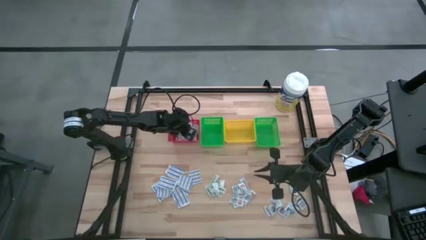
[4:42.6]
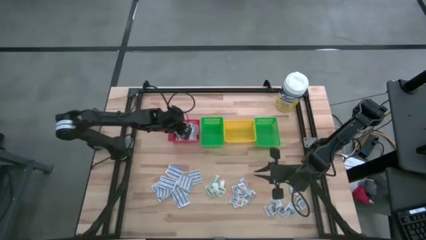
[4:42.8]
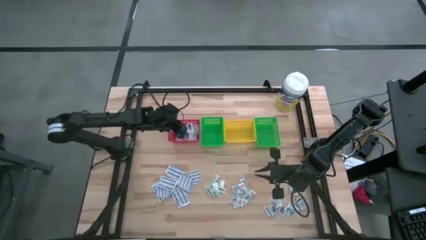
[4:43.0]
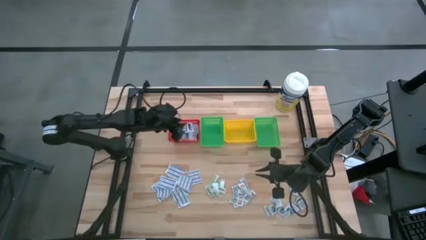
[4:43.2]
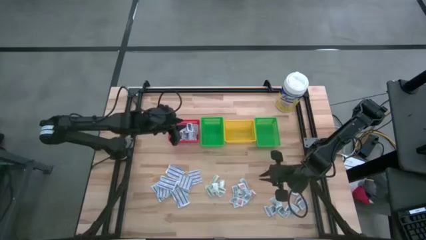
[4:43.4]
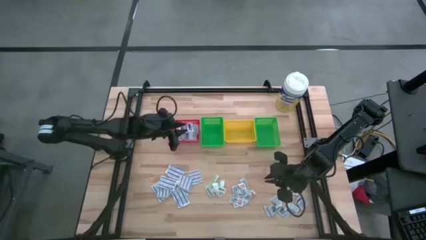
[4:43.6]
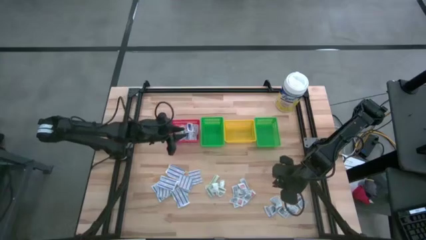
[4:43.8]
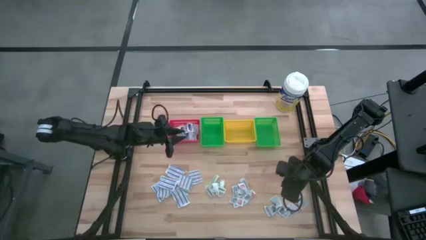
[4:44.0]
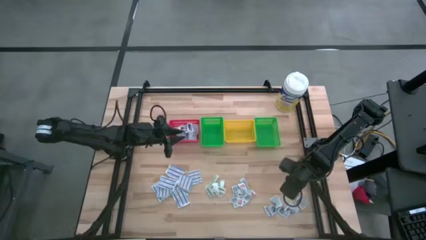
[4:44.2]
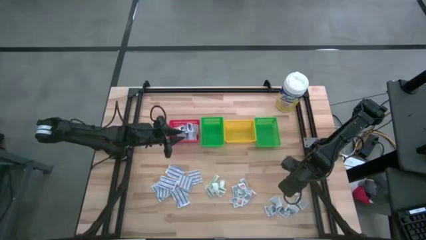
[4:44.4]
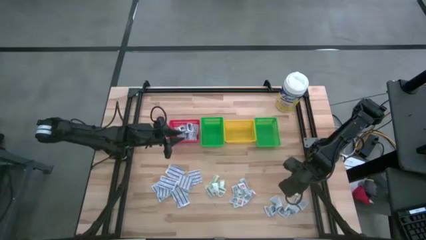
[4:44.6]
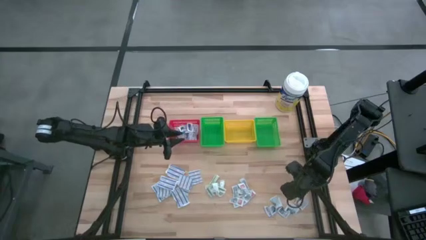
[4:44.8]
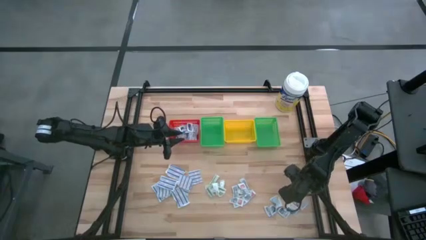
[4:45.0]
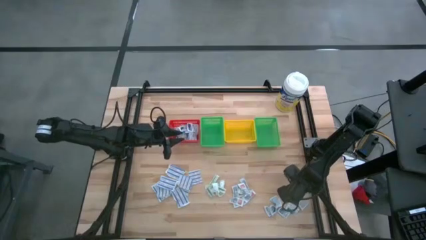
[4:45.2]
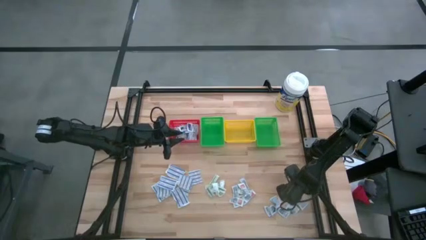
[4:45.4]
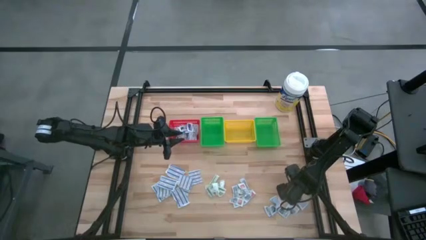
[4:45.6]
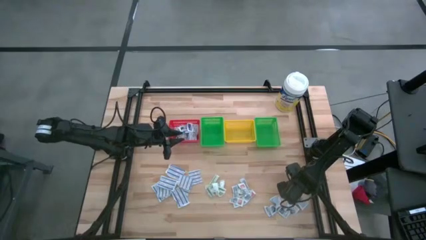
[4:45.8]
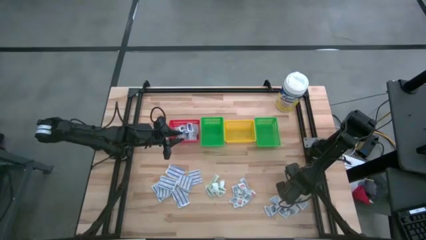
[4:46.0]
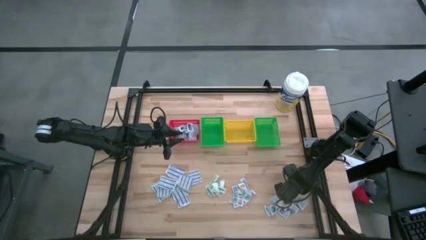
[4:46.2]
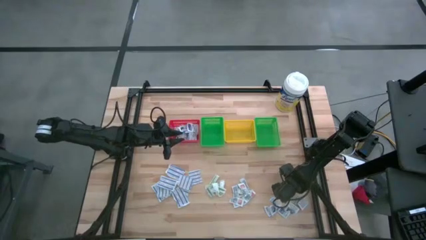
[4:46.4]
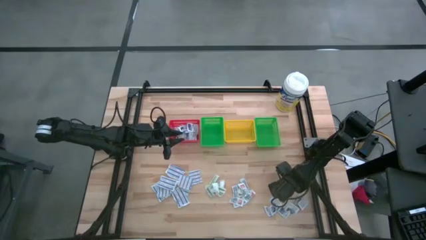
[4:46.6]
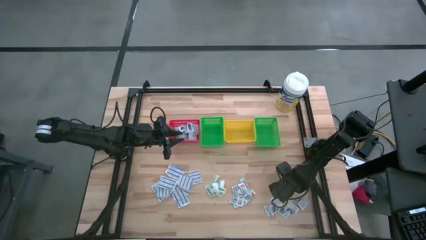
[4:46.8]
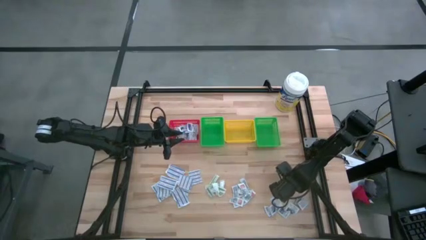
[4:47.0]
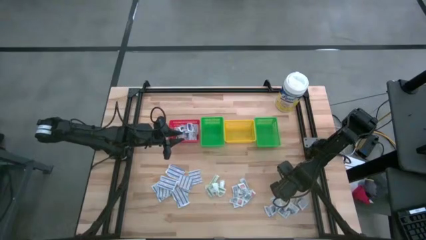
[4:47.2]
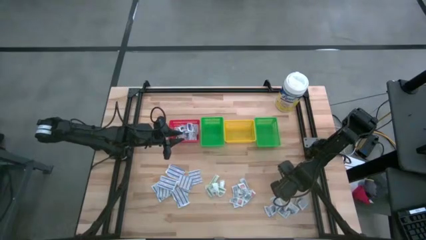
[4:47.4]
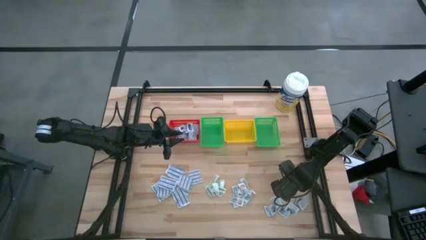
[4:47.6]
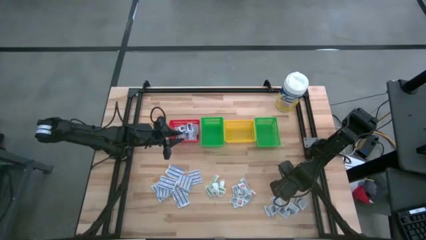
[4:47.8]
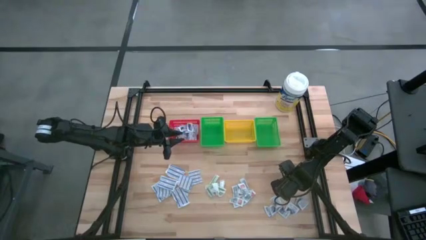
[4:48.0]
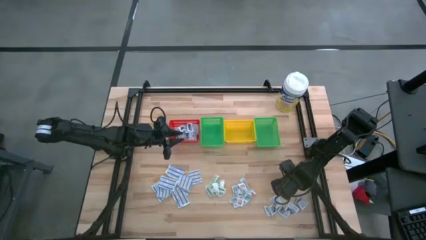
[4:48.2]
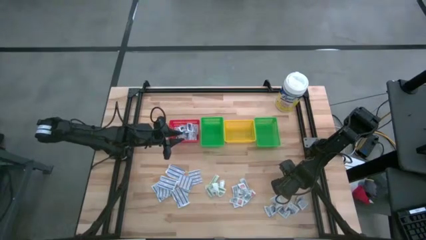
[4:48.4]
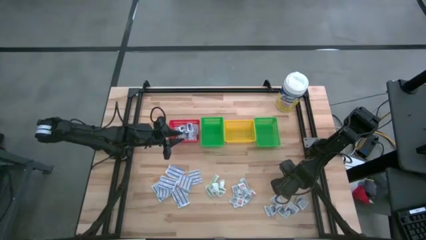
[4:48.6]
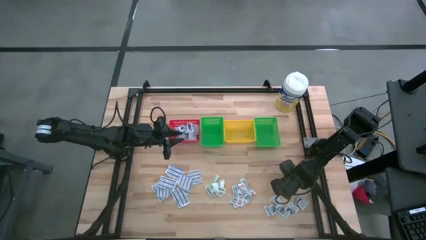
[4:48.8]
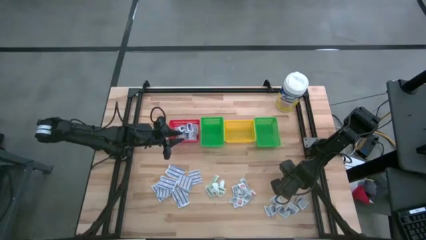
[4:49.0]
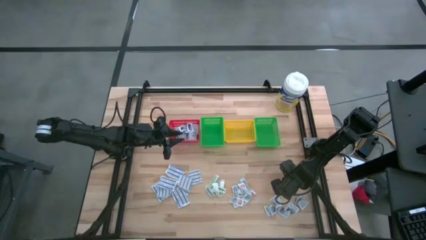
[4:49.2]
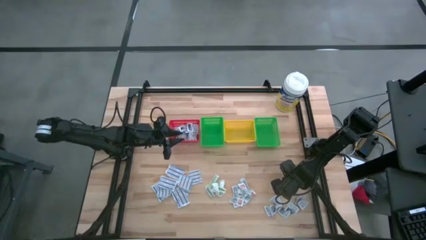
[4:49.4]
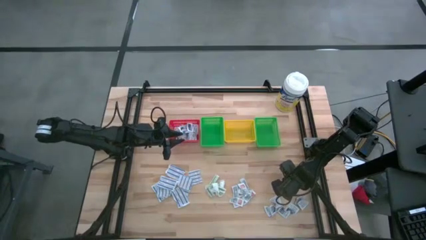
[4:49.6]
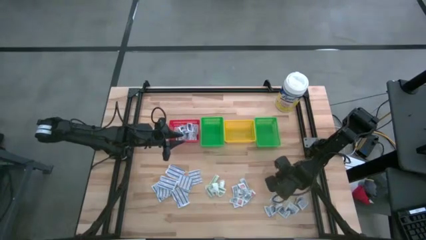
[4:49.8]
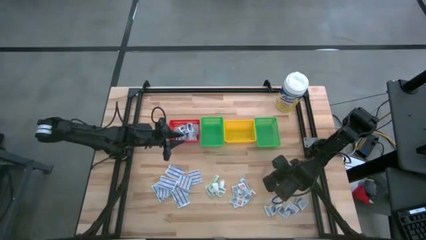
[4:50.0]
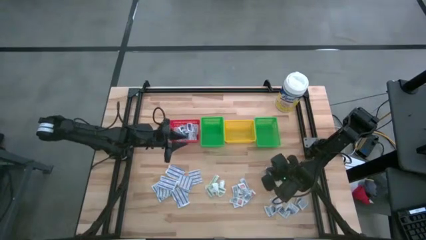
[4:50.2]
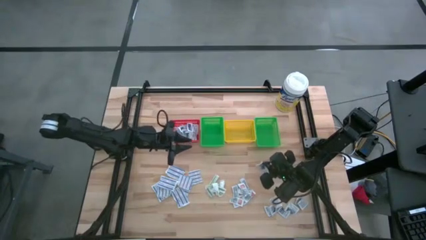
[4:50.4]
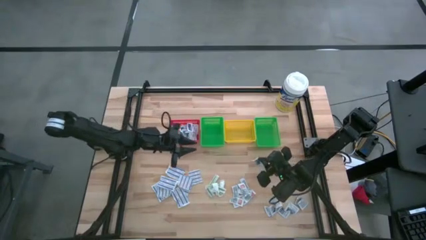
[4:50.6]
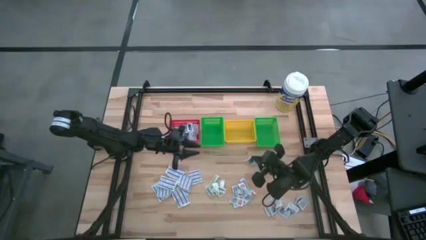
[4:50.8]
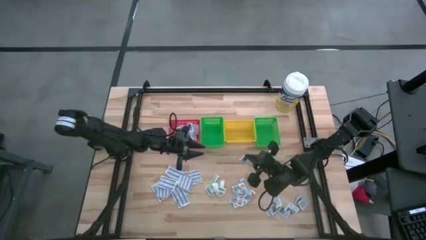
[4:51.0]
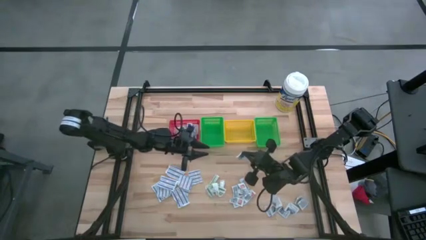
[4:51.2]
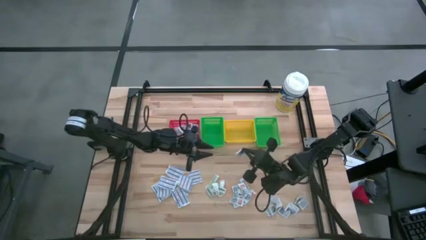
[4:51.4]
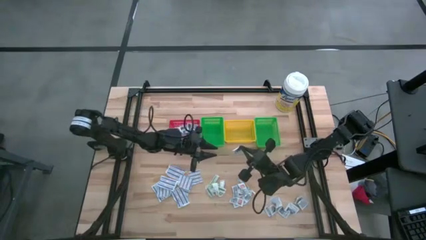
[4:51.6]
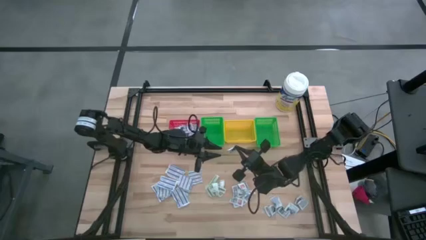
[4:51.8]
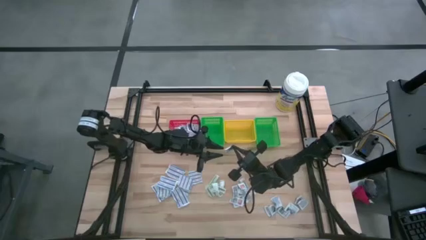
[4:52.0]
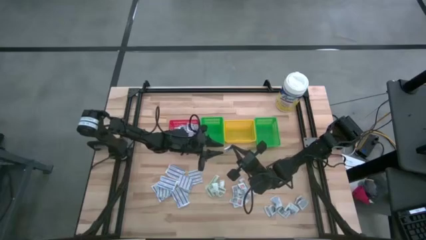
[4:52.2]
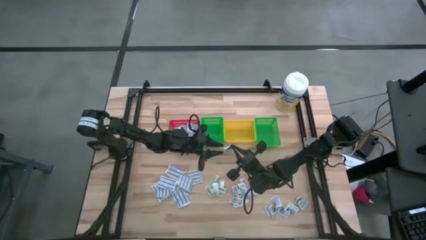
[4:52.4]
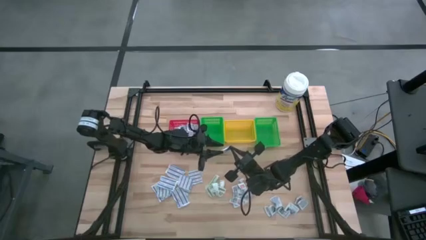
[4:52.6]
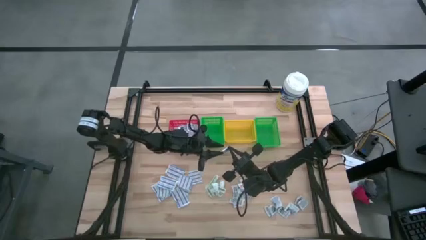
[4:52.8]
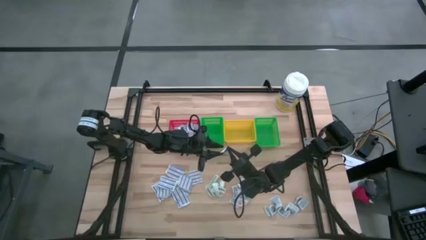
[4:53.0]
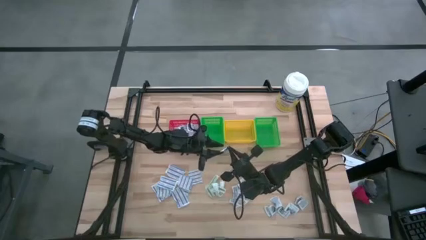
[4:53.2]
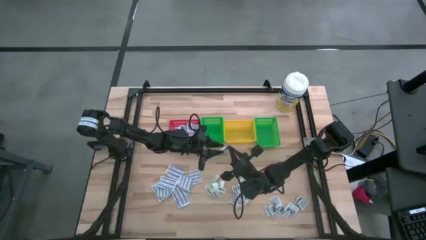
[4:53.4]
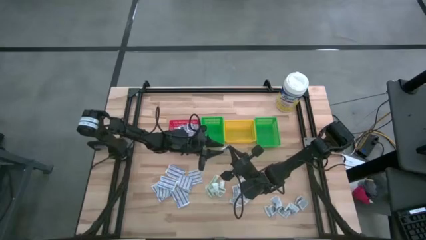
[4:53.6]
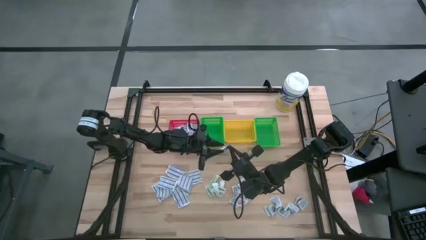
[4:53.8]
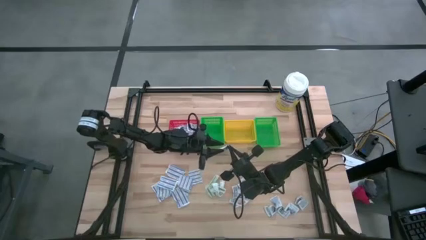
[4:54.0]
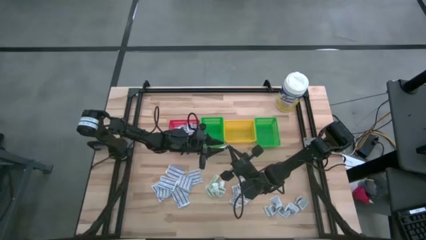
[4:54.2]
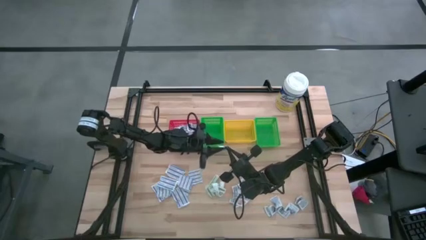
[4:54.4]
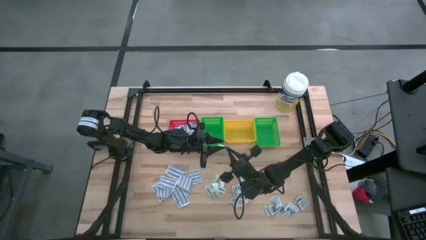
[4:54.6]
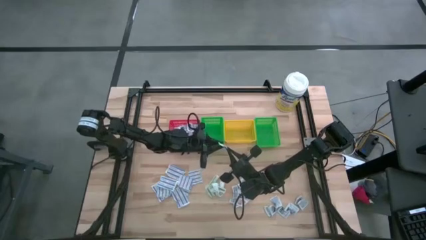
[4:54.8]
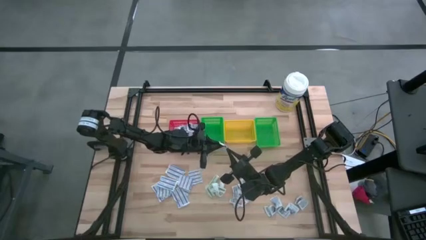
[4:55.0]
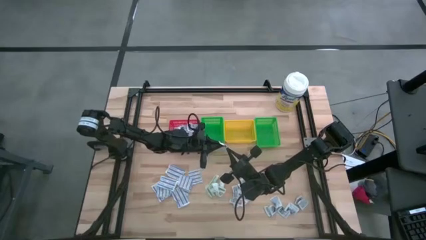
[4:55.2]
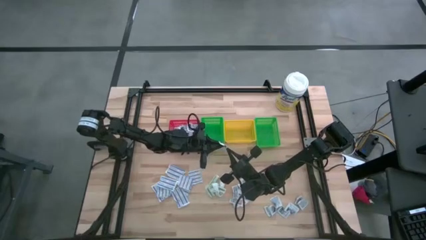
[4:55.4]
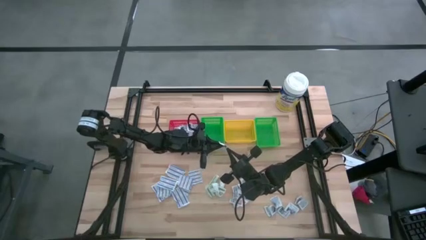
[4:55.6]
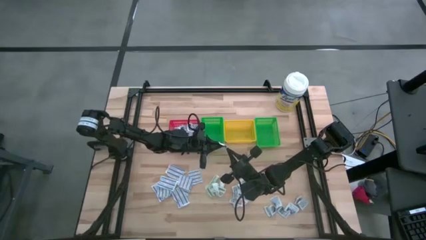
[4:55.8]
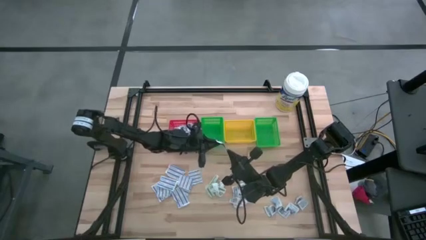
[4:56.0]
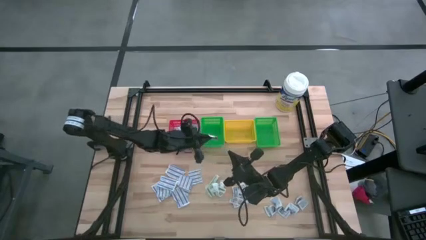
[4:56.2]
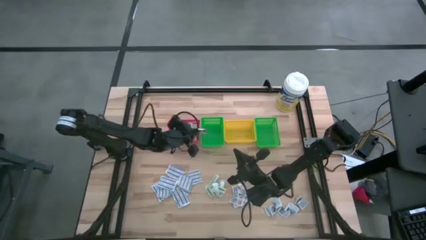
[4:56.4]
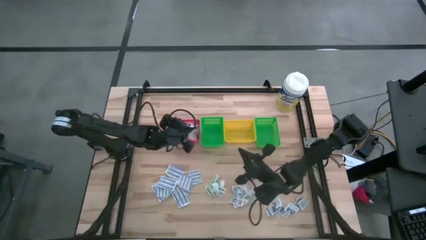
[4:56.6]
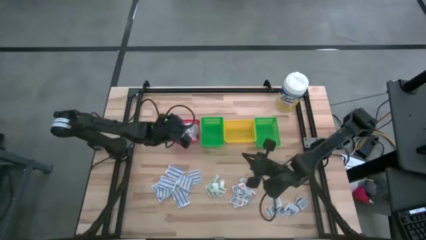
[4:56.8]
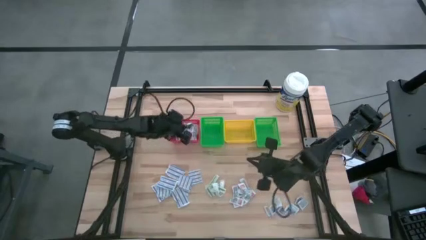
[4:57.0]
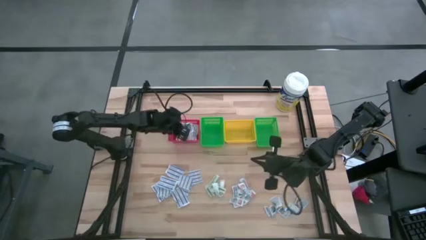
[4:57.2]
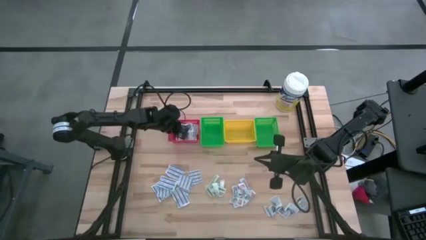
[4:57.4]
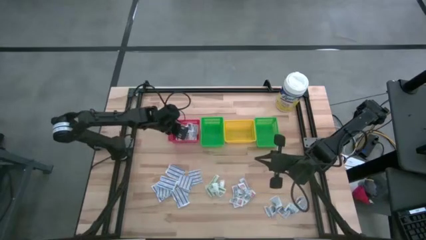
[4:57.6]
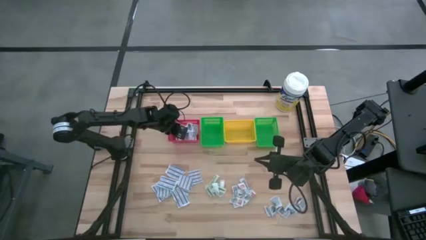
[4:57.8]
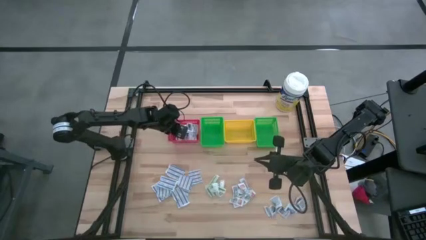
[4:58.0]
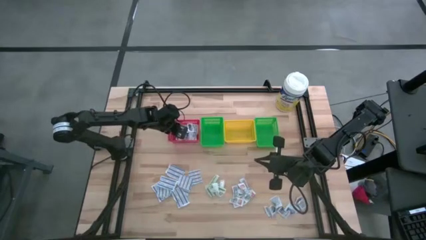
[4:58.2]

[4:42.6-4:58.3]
Task: Pick & Place First Aid Supplies
Put the alcohol pad into the red basket
